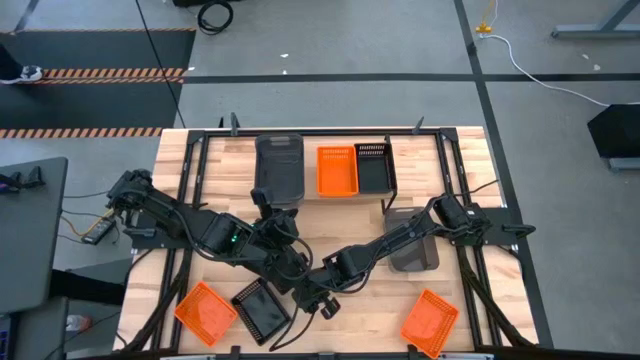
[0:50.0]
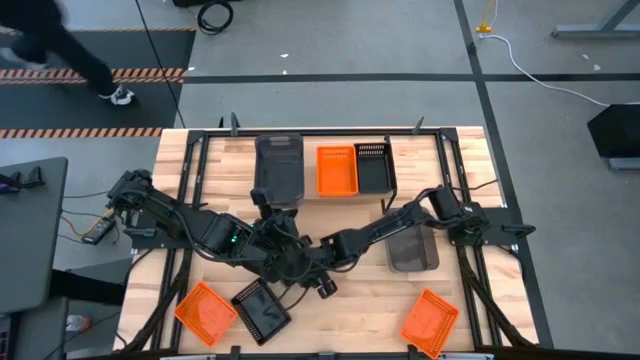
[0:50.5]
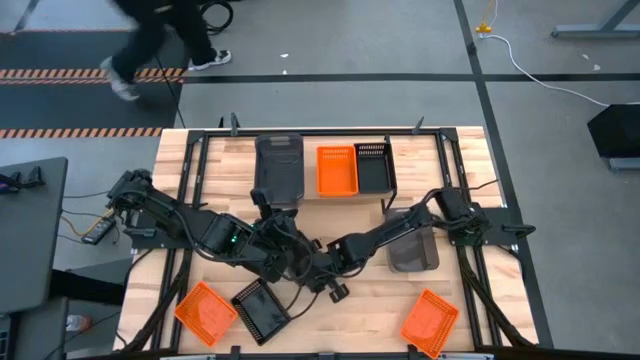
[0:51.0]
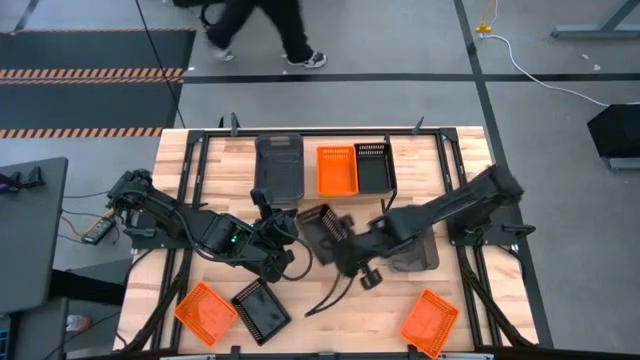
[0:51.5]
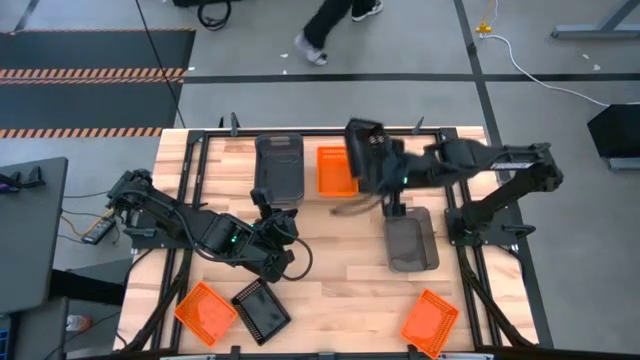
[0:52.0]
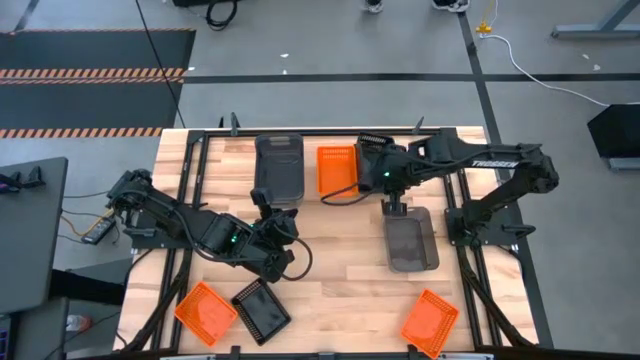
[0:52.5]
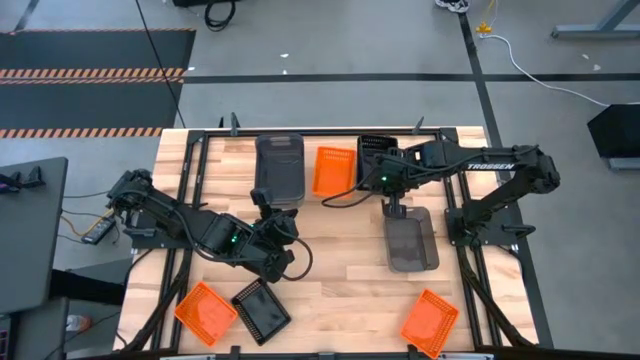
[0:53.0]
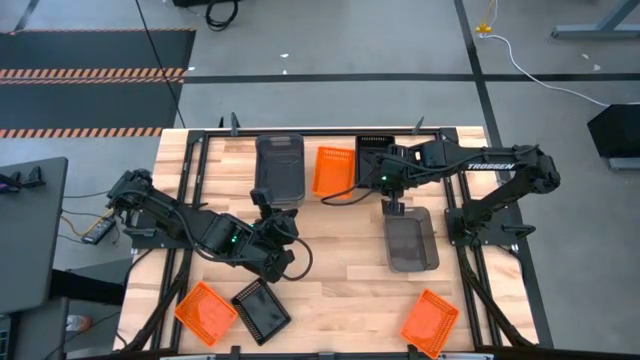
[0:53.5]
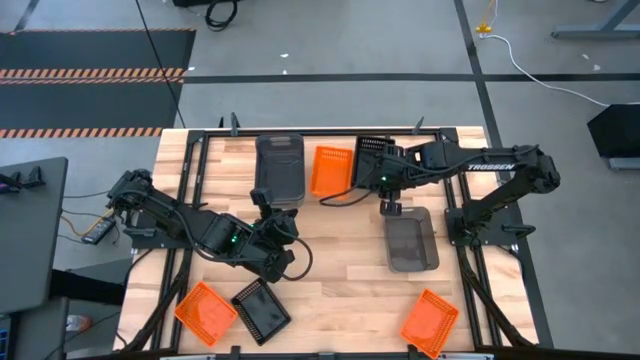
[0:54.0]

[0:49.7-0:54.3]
Task: Stack baskets on shelf by color
Stack the top black bin on the black bin on the shelf

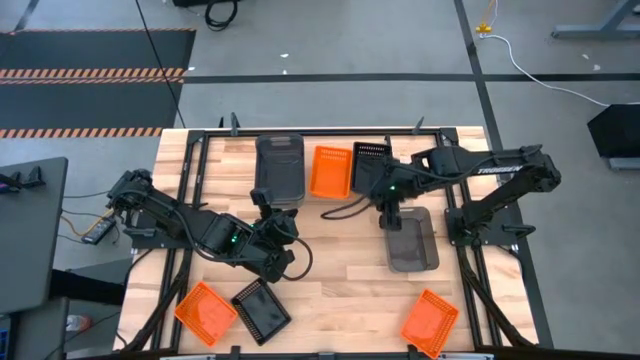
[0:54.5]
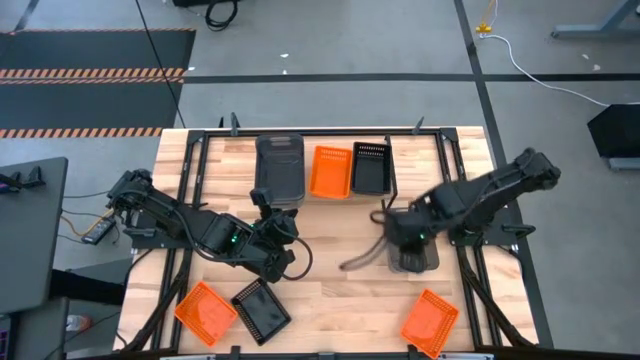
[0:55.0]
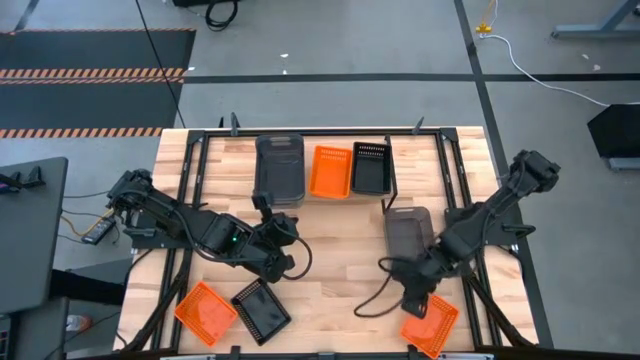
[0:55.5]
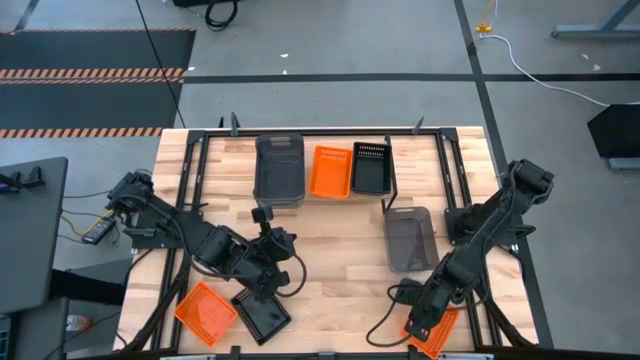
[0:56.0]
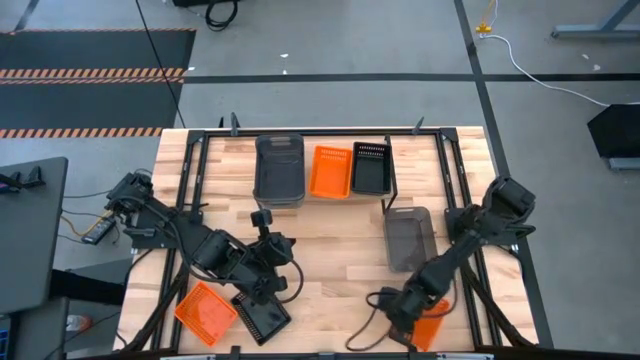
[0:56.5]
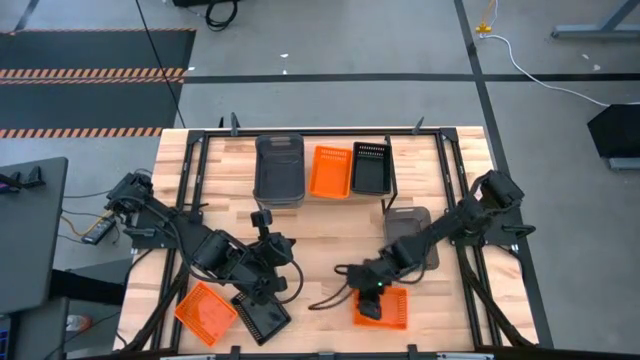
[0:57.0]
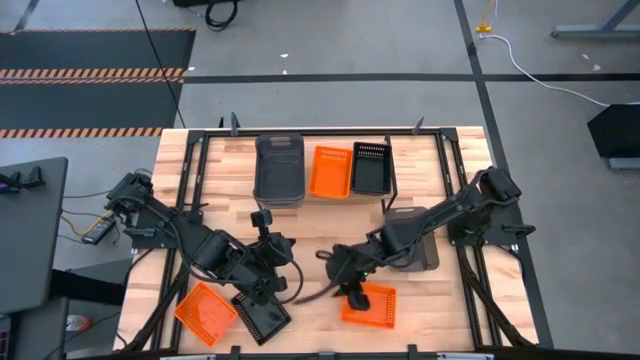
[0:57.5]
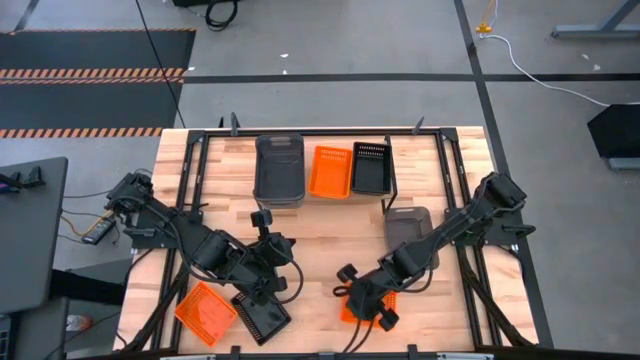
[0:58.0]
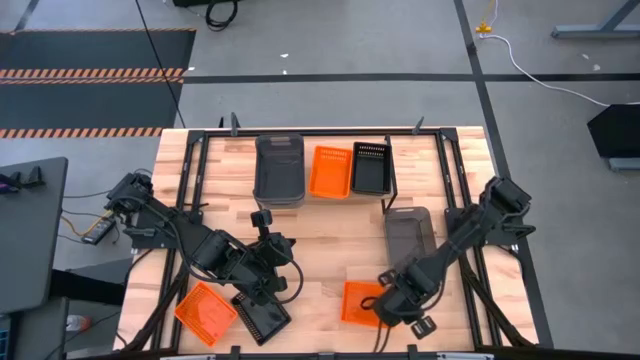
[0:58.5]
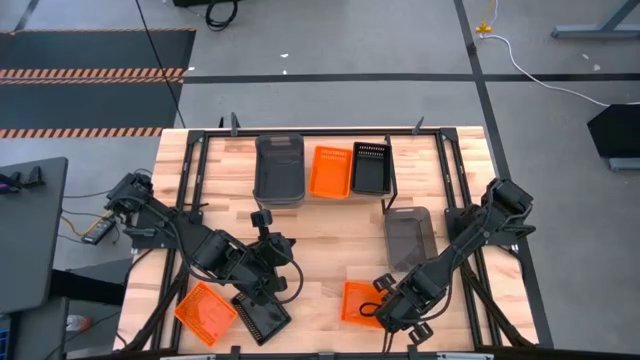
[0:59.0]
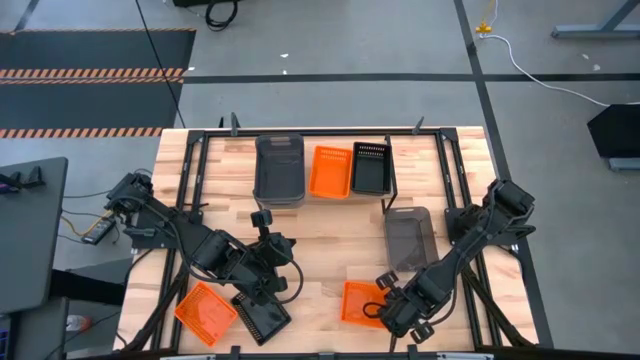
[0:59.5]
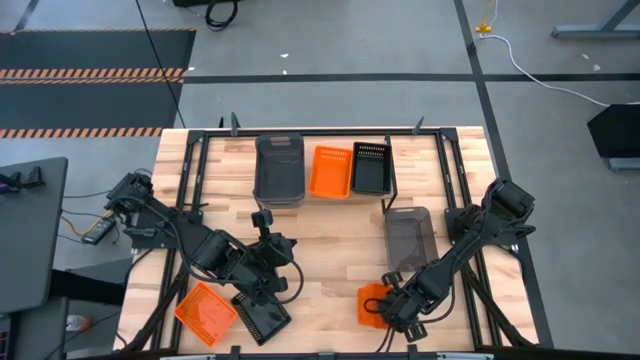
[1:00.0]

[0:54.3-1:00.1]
Stack the right orange bin on the orange bin on the shelf

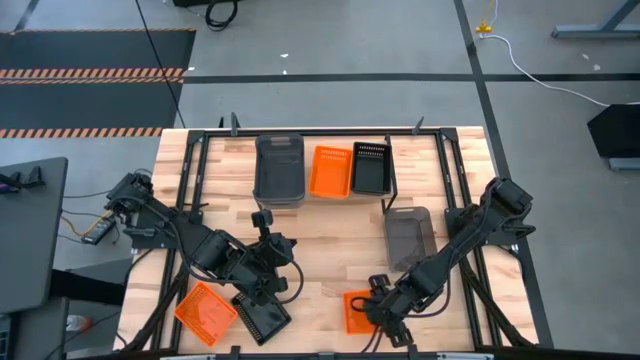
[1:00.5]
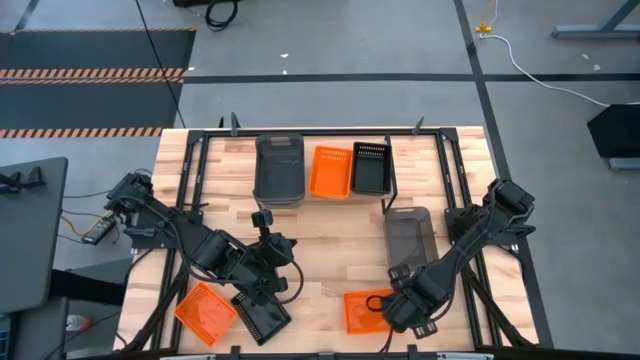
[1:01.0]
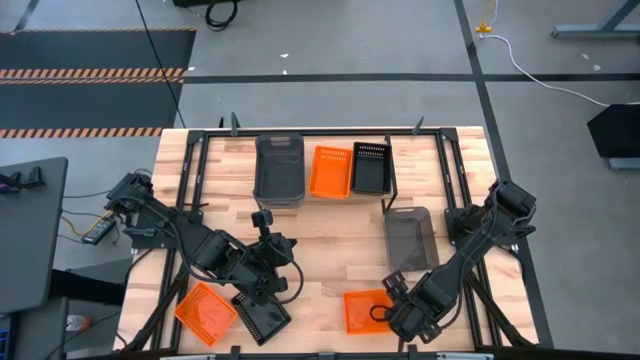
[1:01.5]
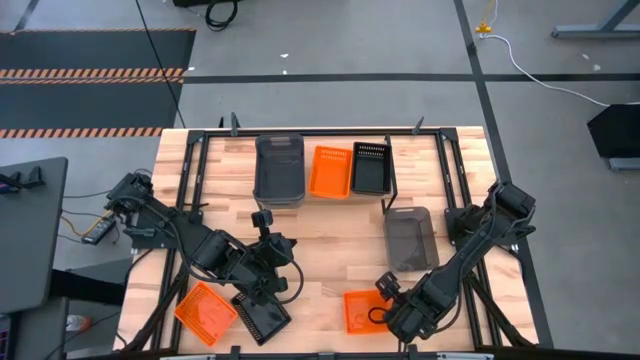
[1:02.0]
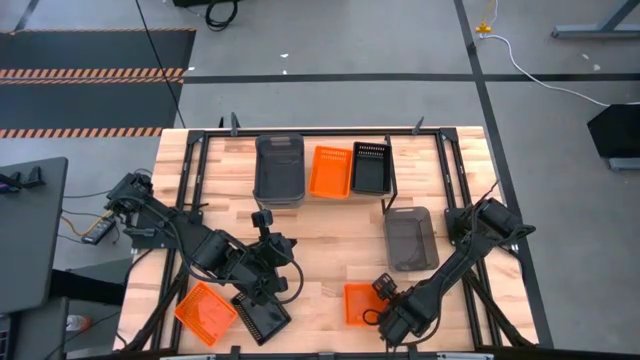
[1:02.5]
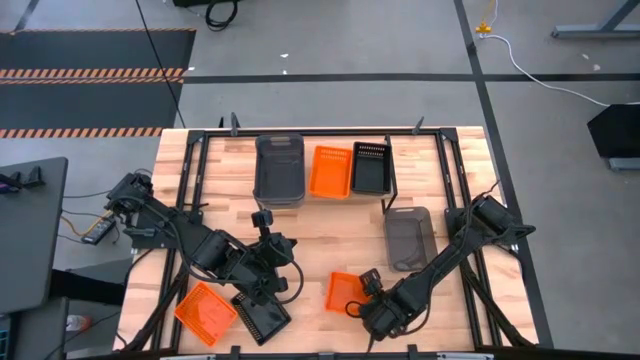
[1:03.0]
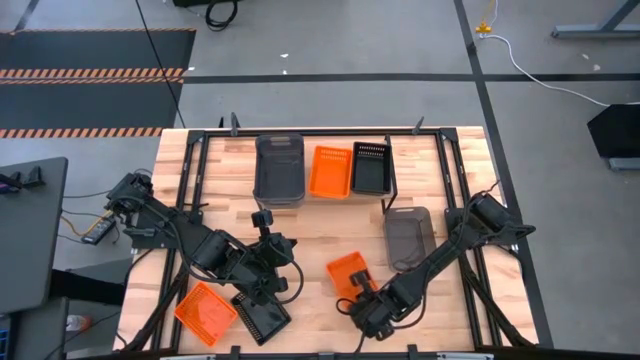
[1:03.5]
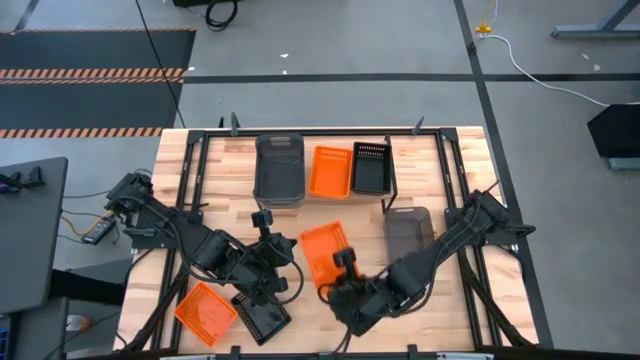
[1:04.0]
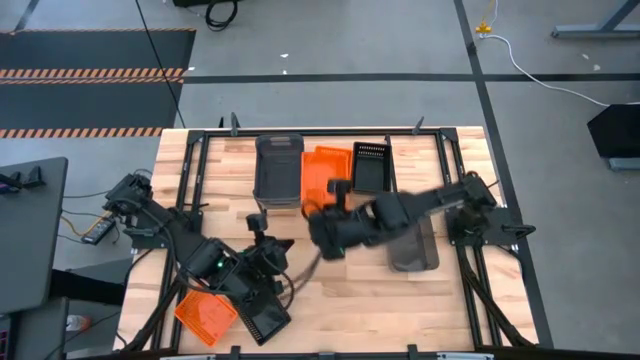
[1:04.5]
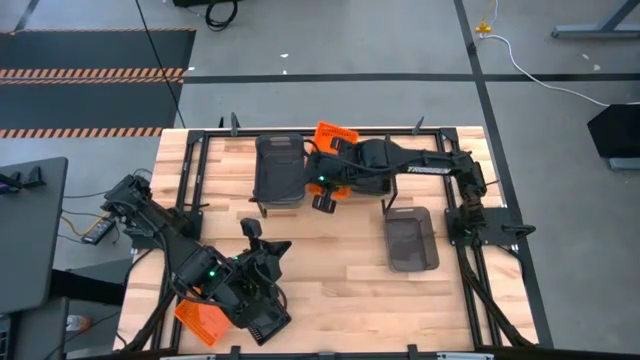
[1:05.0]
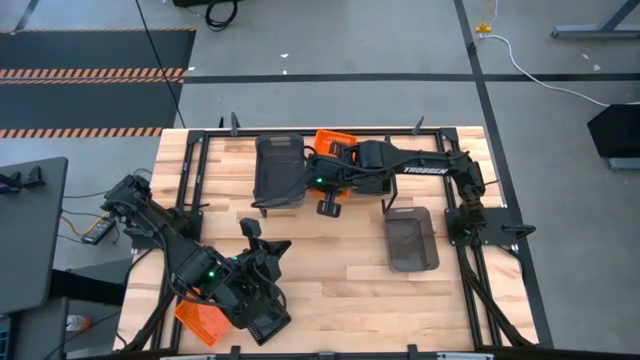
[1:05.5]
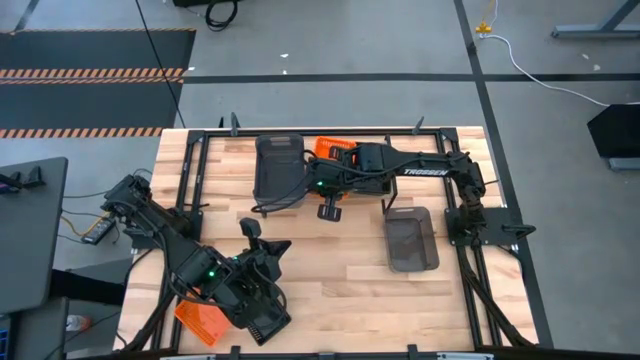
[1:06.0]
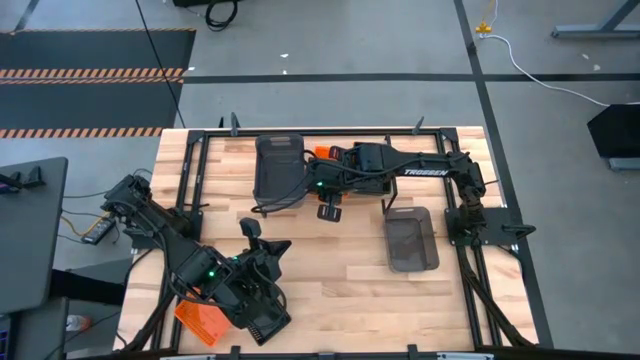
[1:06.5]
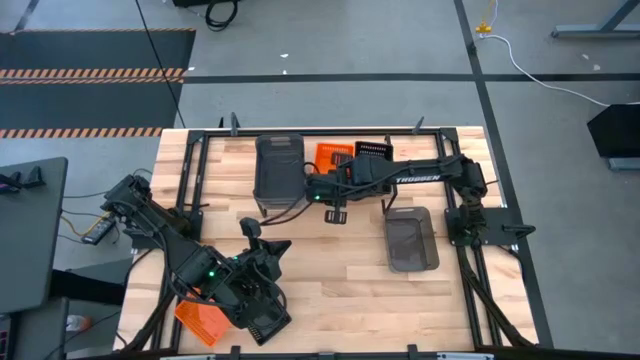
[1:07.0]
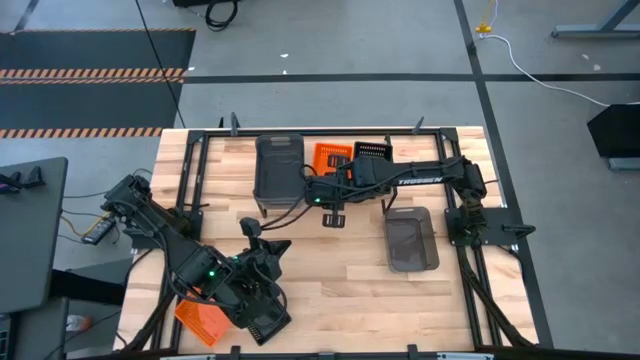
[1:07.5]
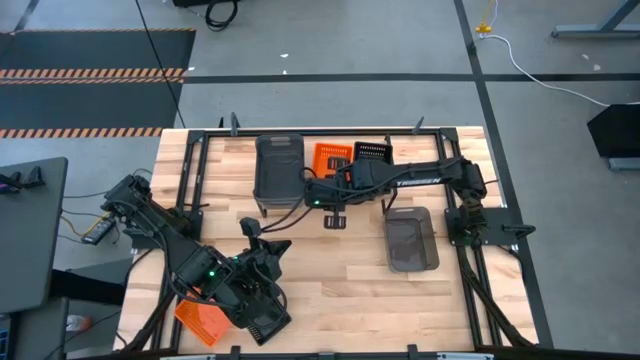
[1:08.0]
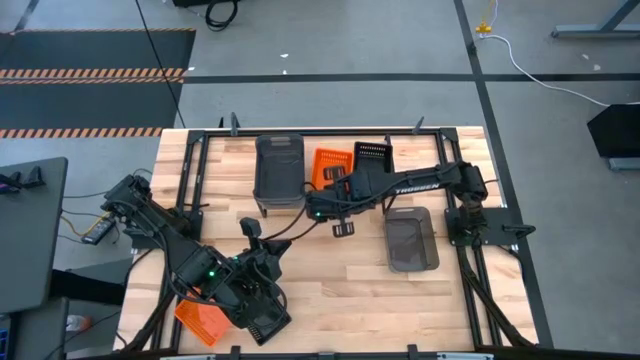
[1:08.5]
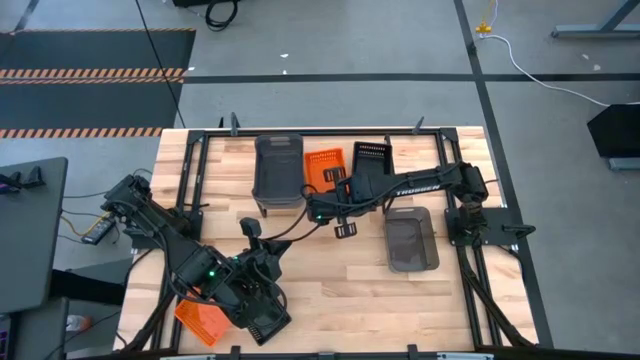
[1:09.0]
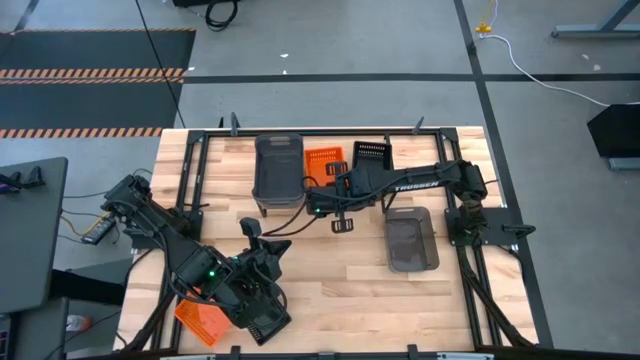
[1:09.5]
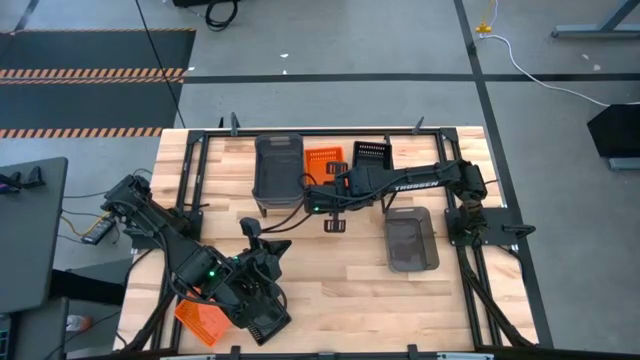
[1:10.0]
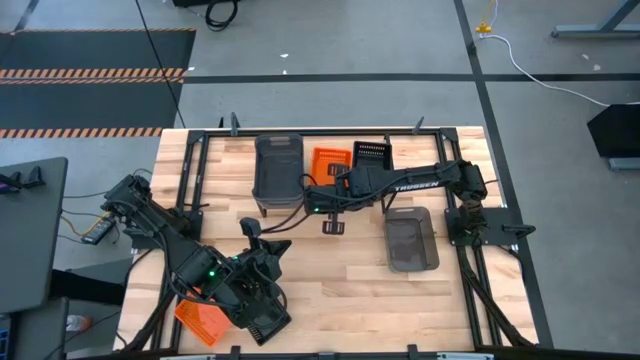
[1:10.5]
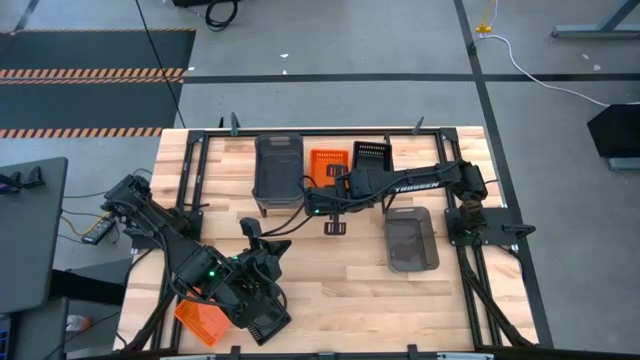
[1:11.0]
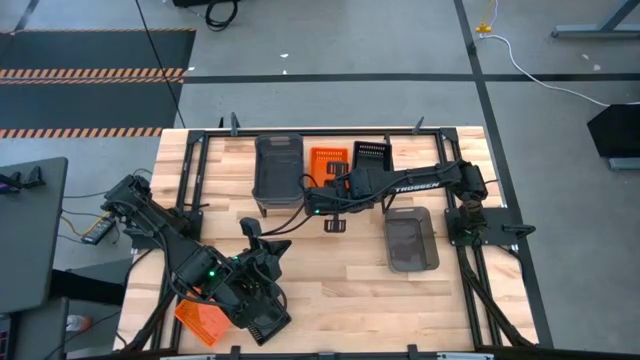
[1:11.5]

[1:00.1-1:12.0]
Stack the right orange bin on the orange bin on the shelf

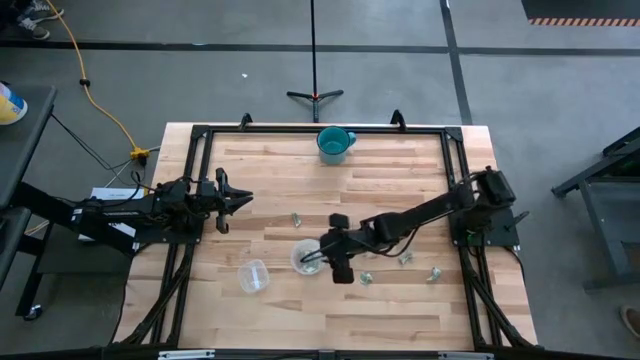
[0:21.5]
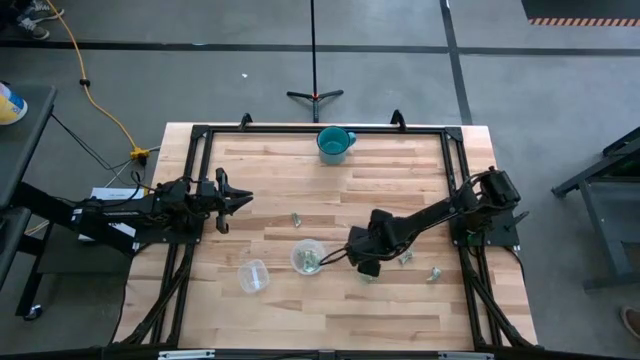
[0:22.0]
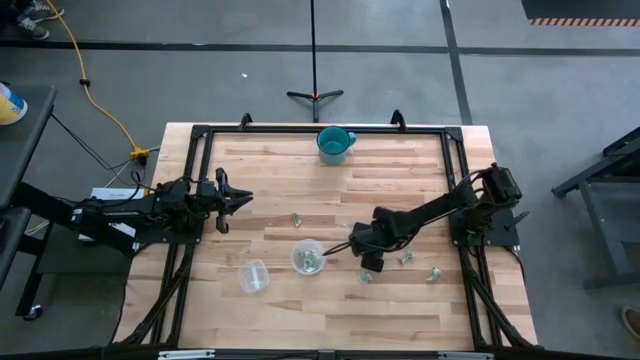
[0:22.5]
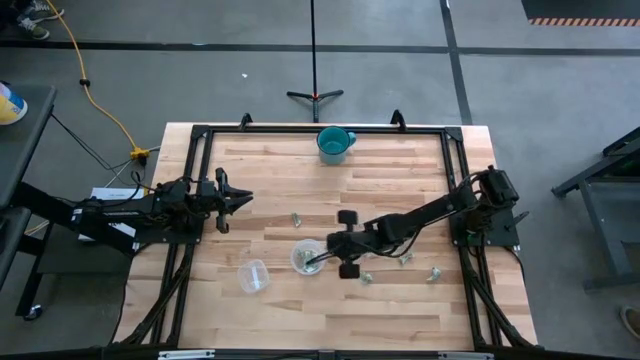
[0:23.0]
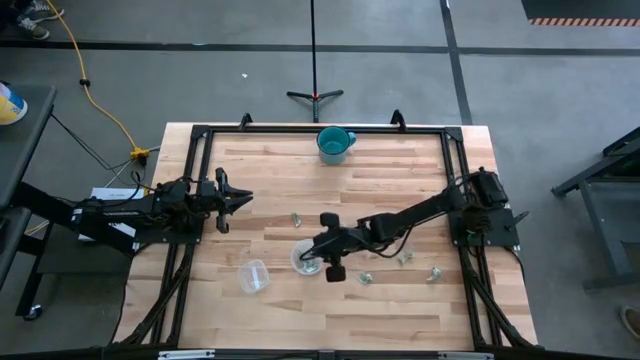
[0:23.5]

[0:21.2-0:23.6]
Task: Pick and place items into bin
Put the stevia packet into the right transparent bin
